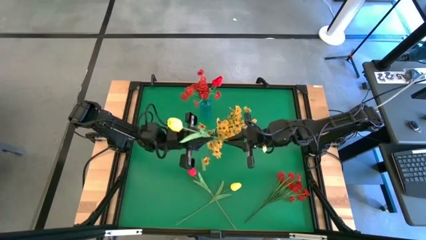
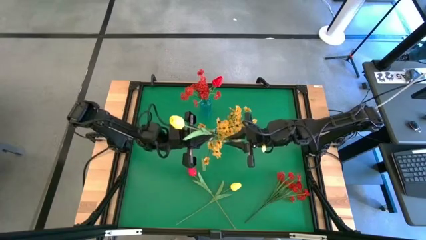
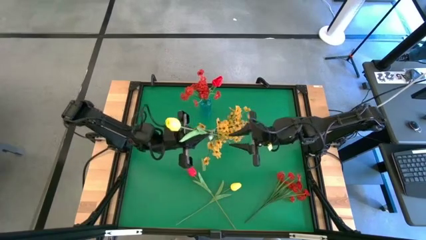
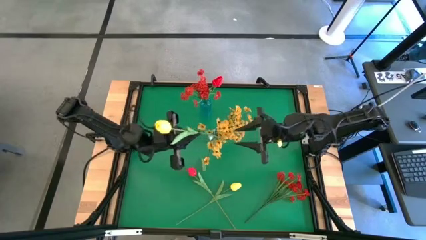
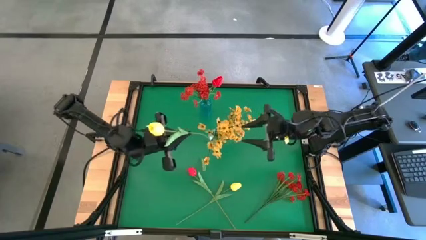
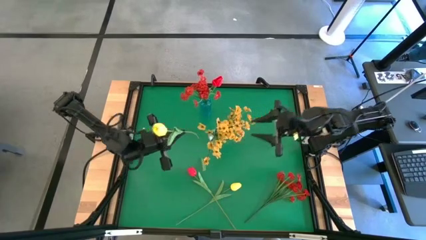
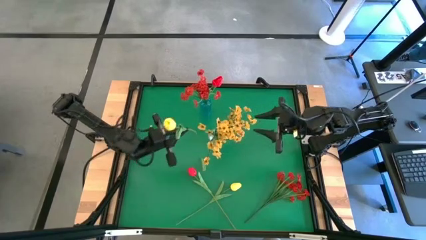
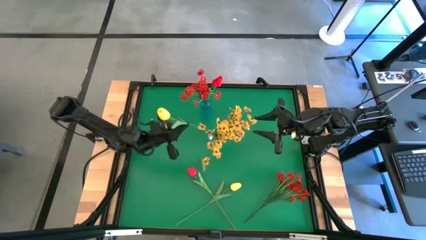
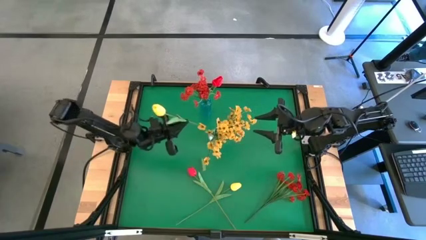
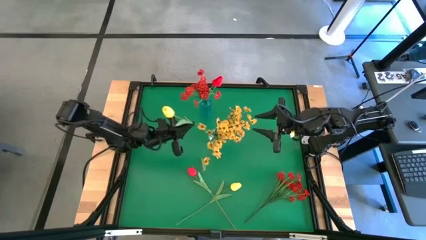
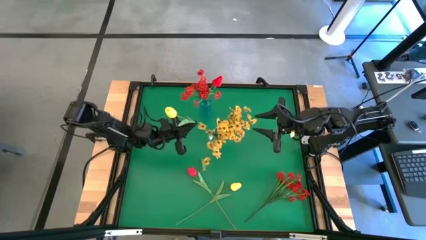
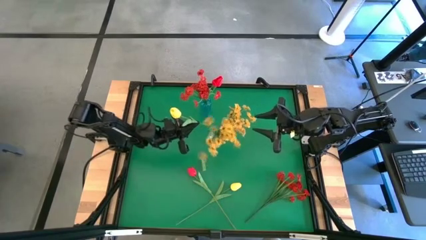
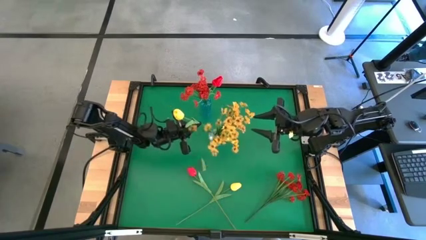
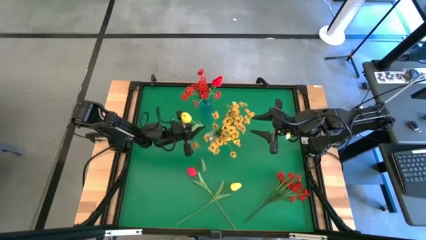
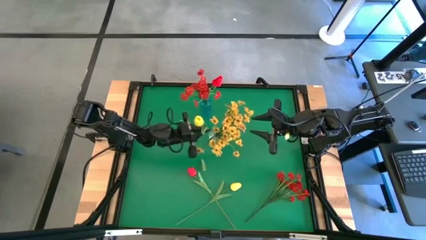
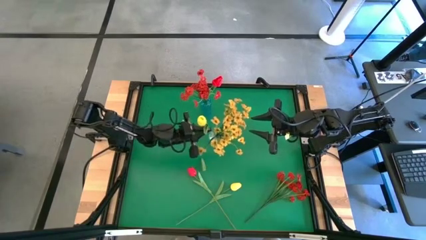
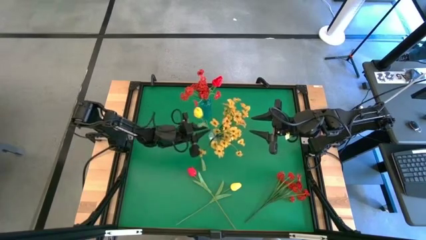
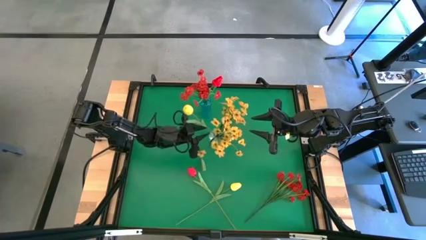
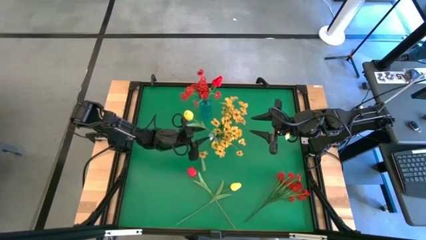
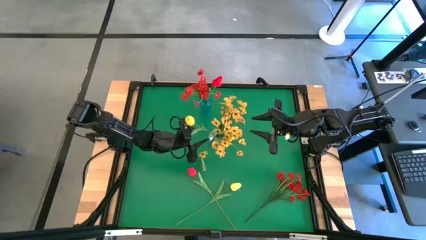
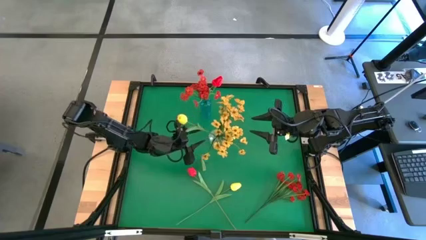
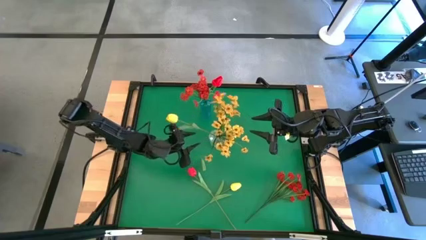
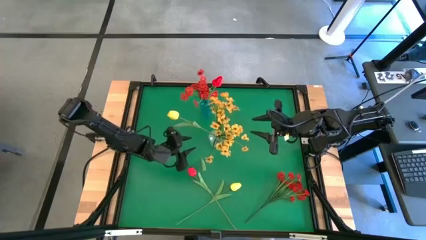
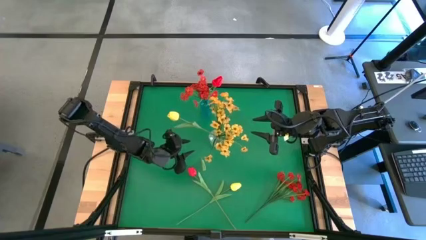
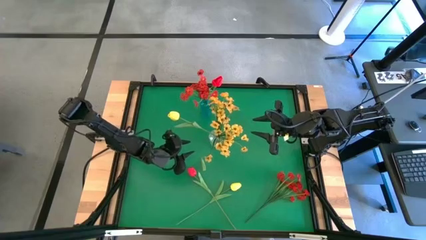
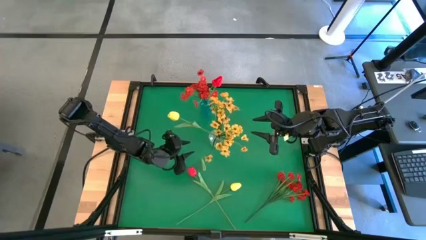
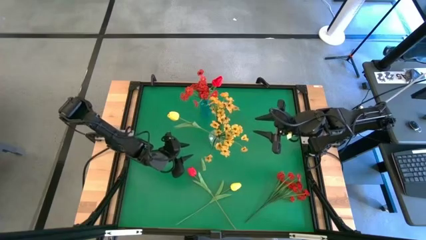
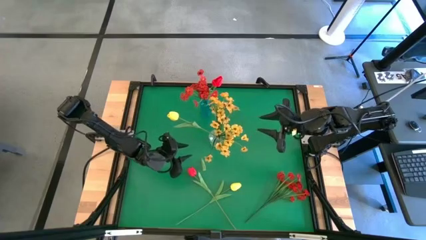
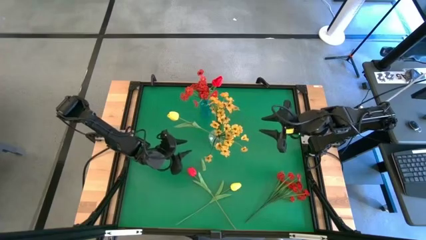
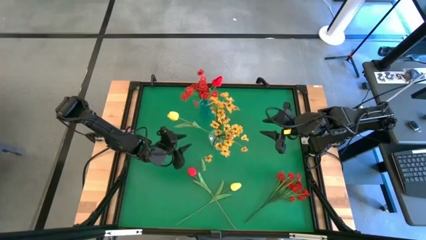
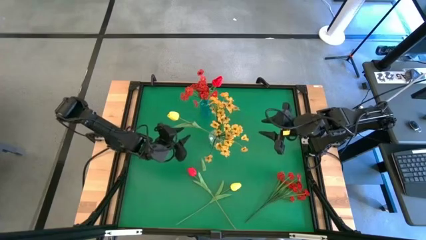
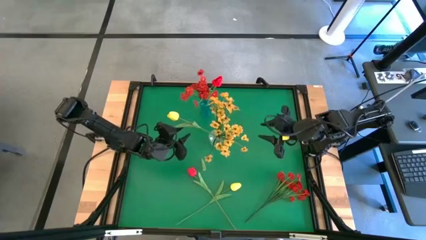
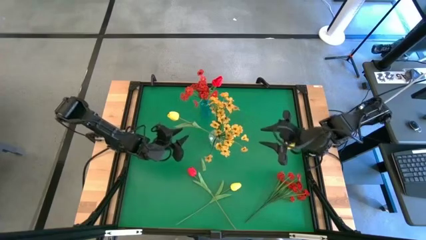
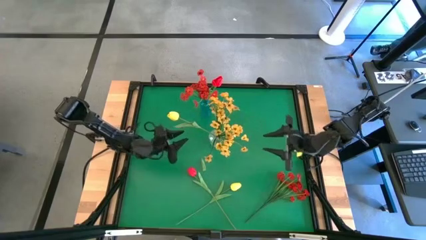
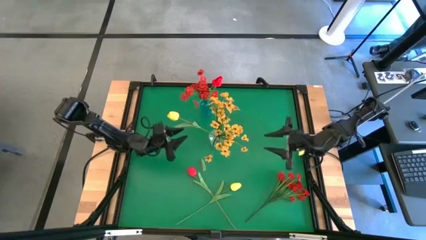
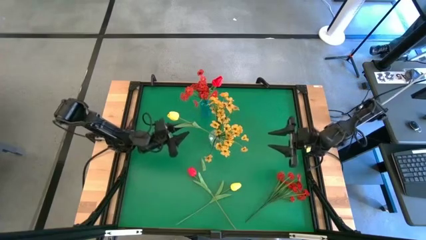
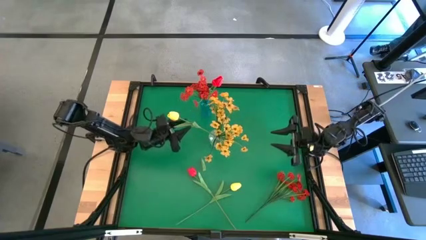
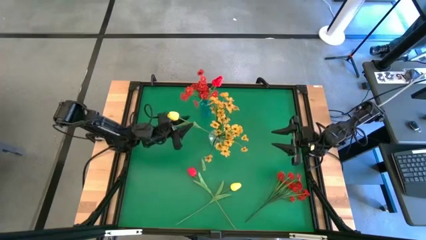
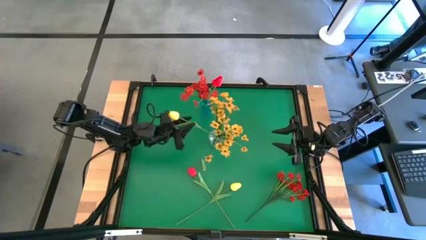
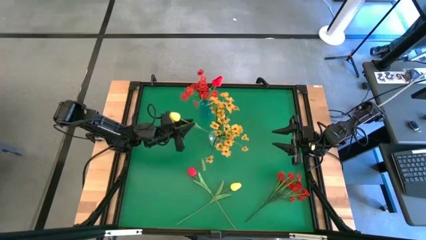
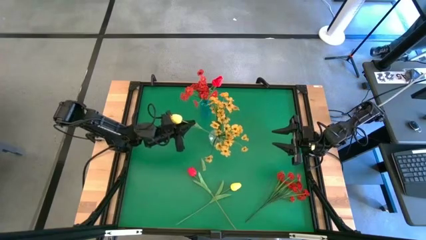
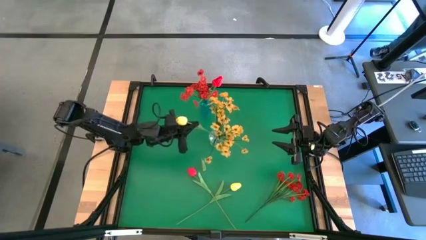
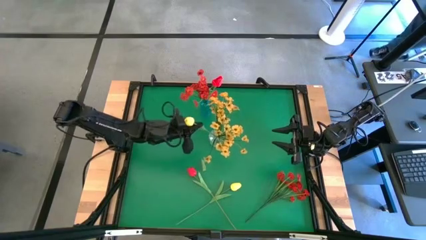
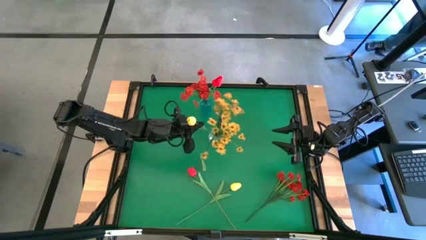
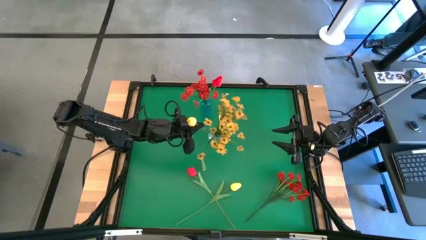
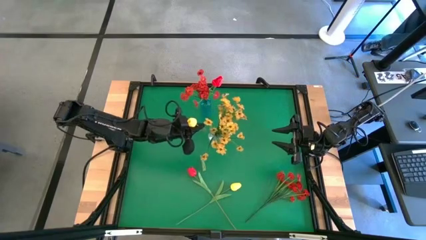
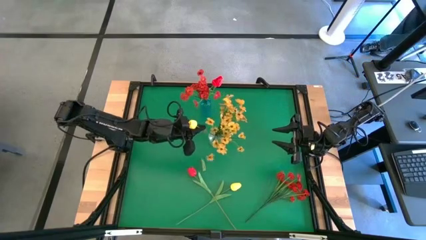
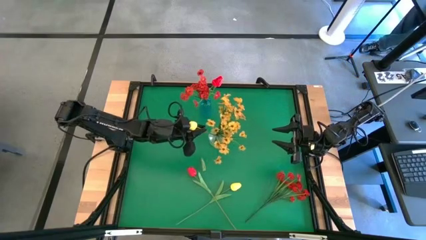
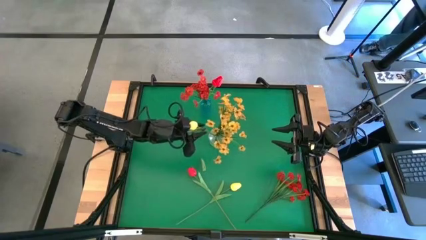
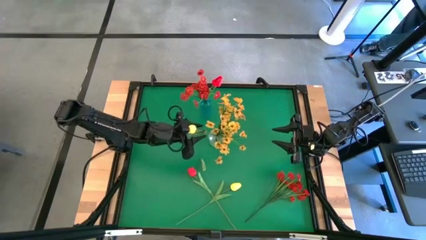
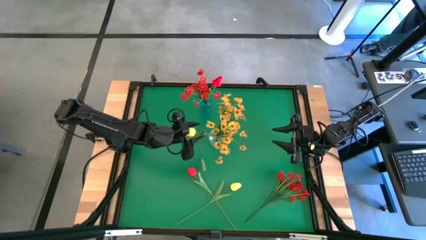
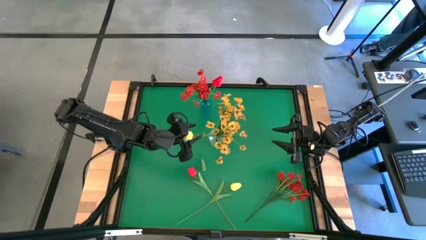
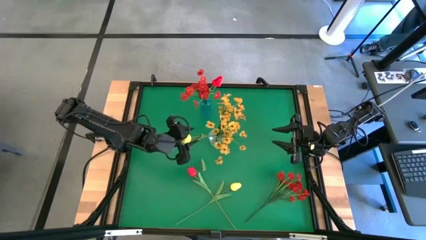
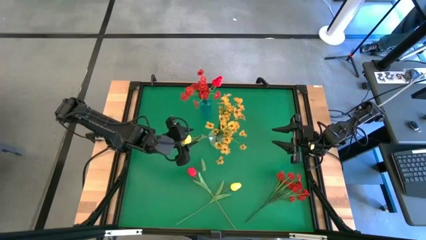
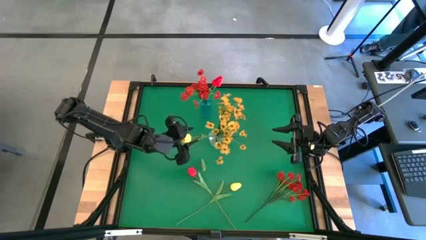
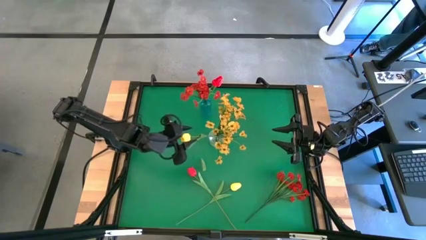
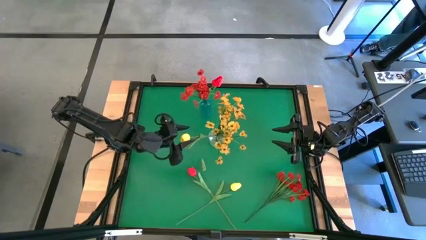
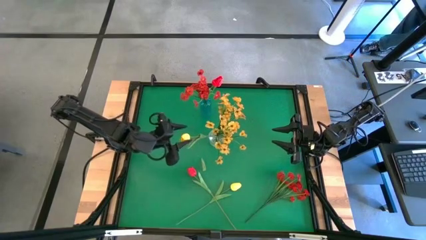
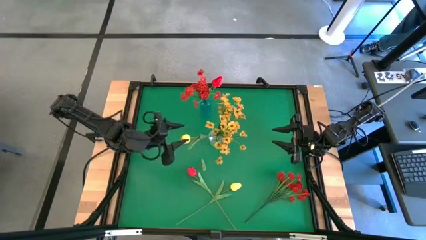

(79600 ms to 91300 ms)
Task: Sort flowers into vase by color
Adjust the yellow flower in the transparent vase
